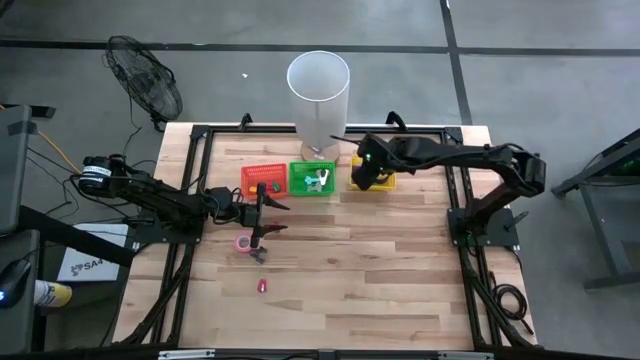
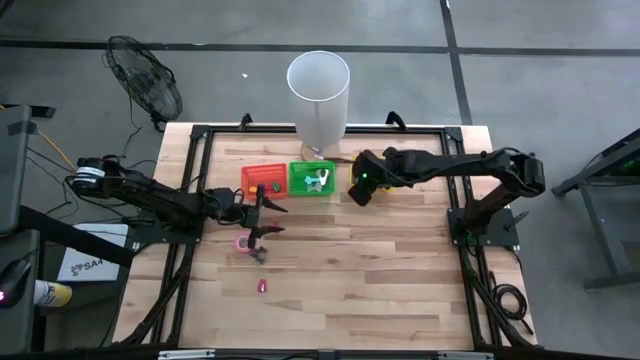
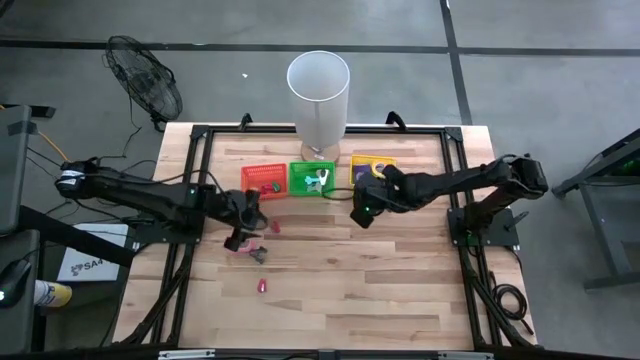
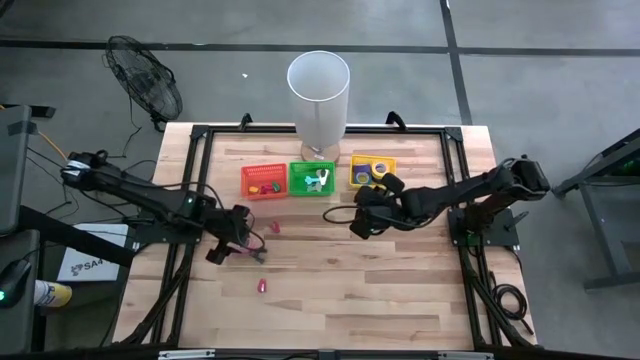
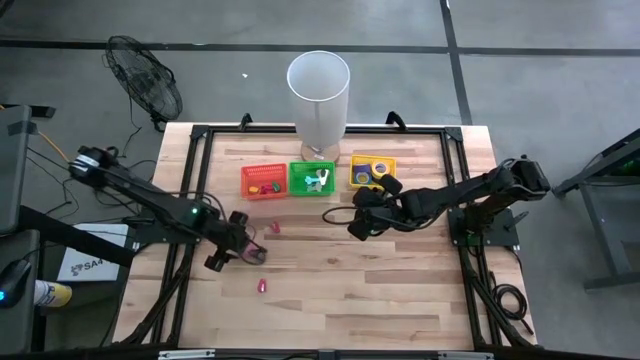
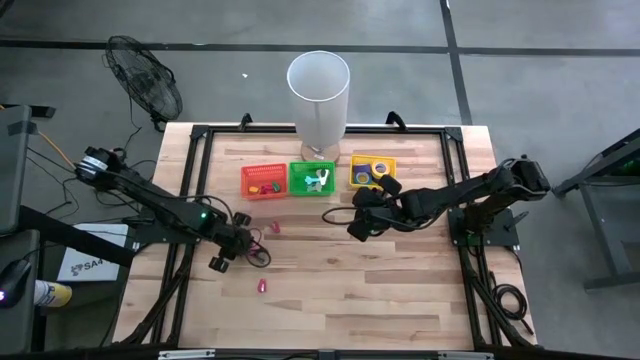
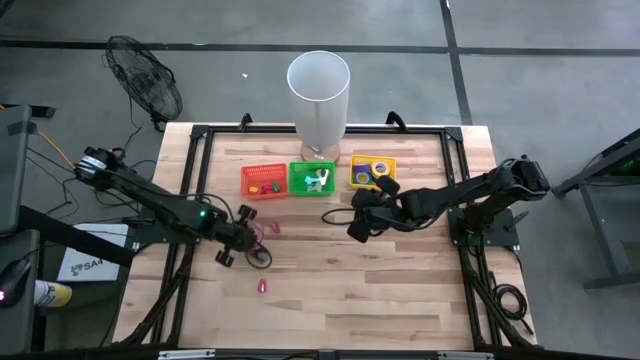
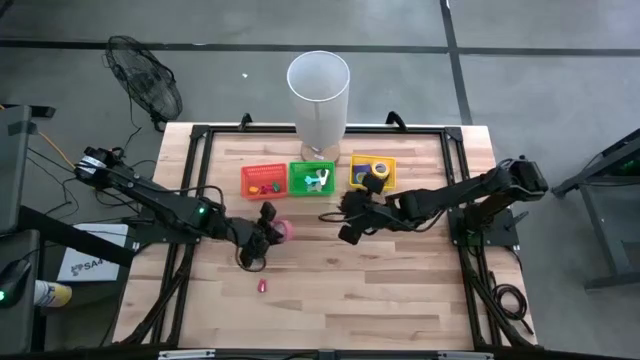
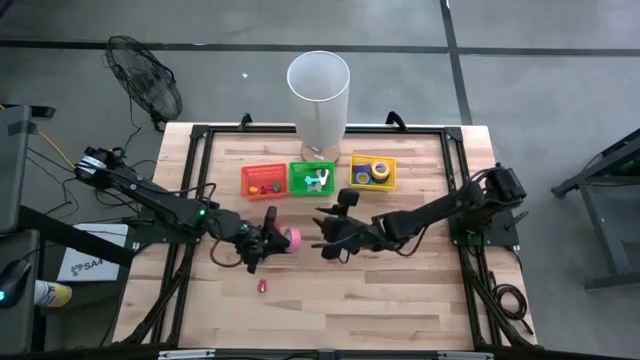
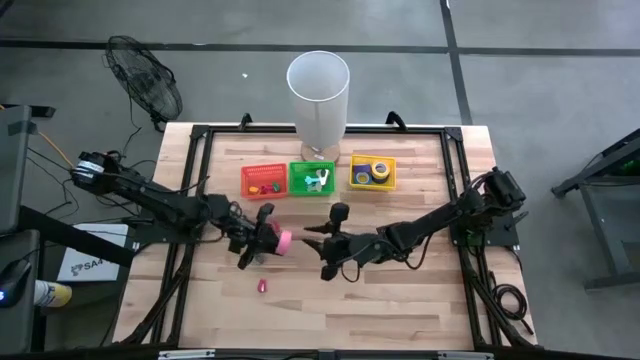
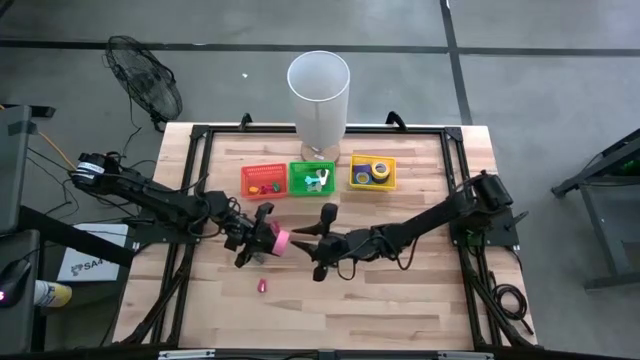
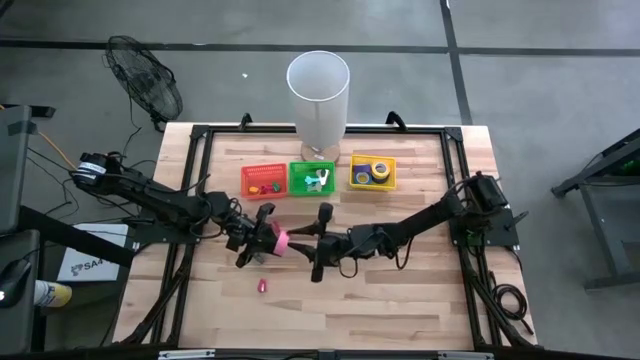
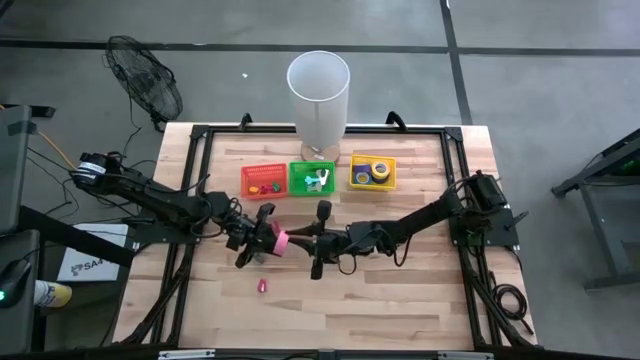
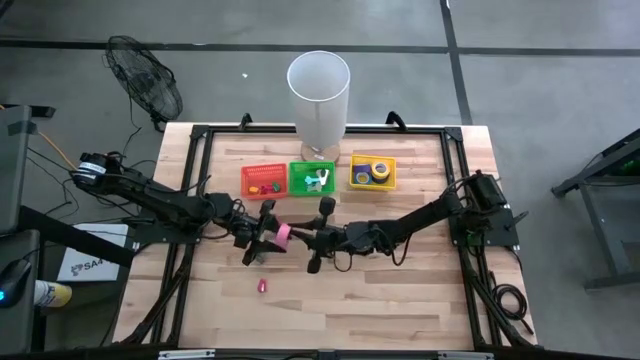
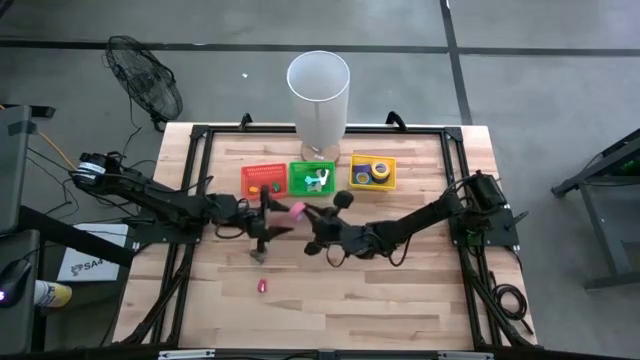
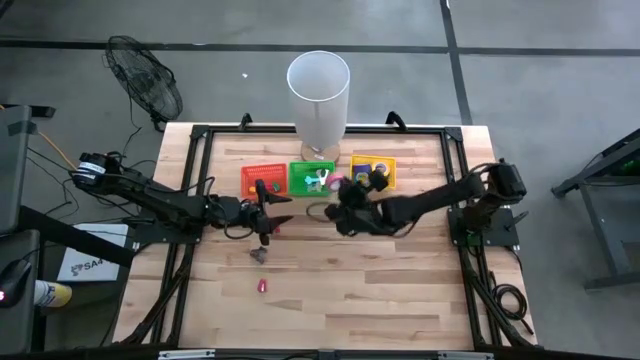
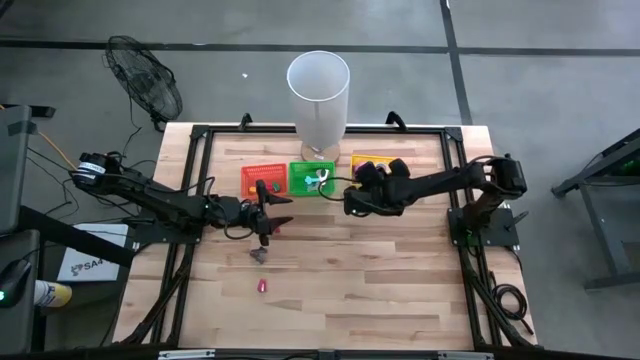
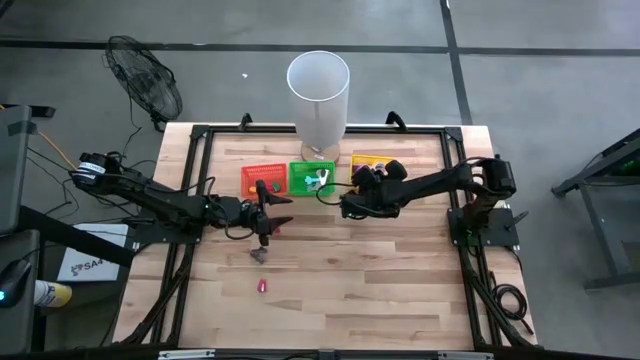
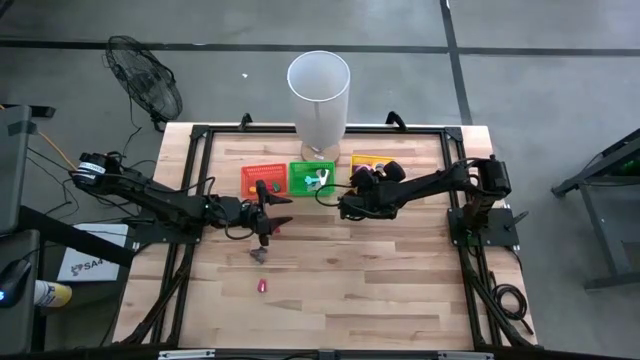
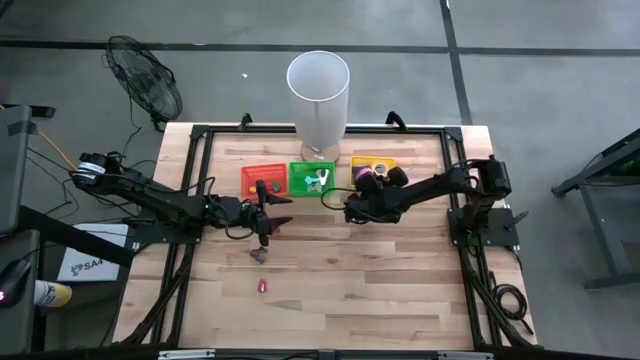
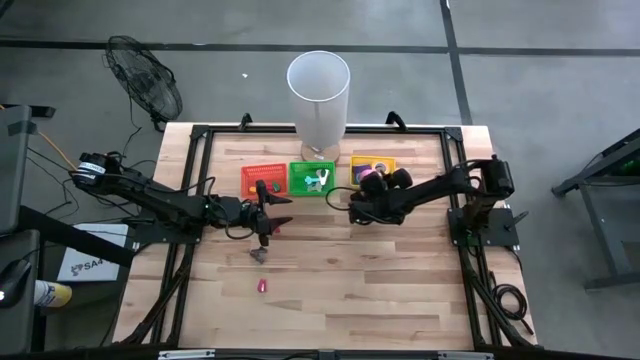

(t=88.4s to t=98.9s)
Task: Pick and place Stapler, Stapler remover, tape
Put the pink tape into the yellow bin

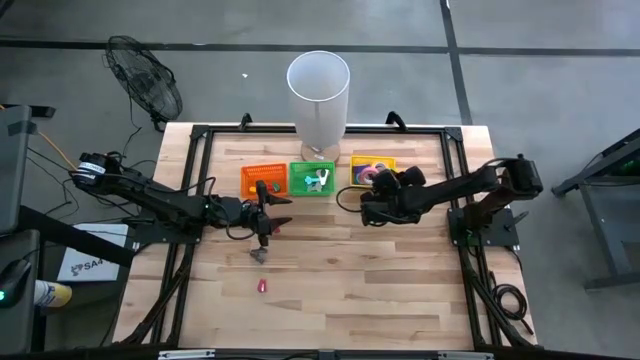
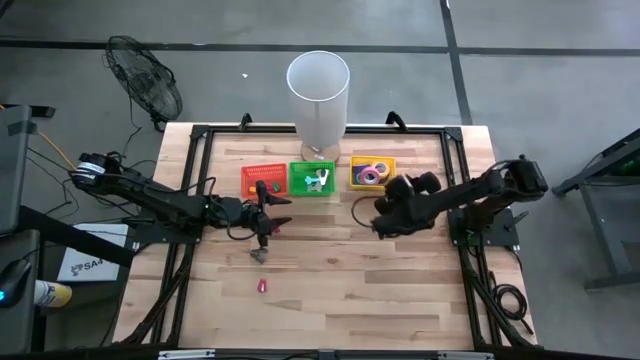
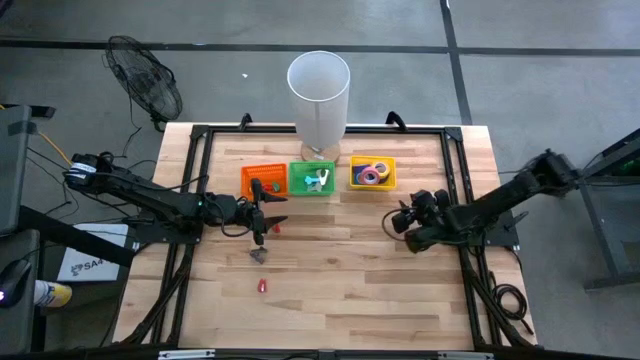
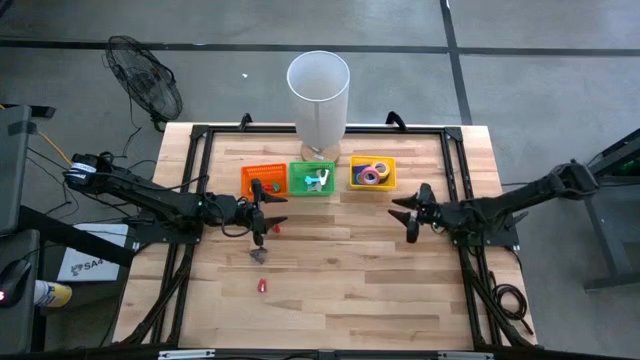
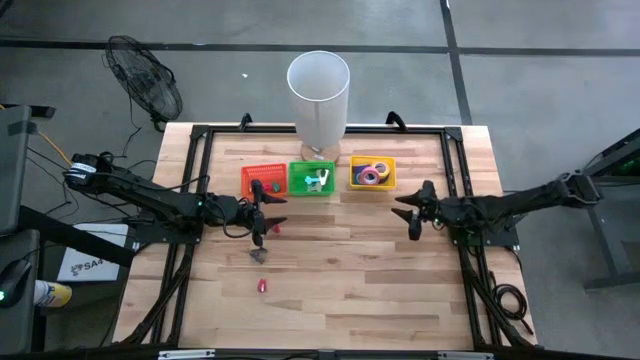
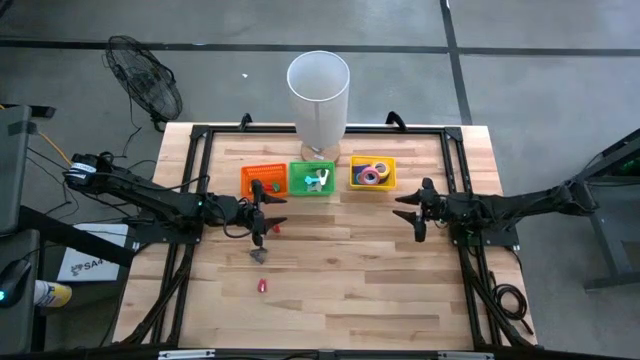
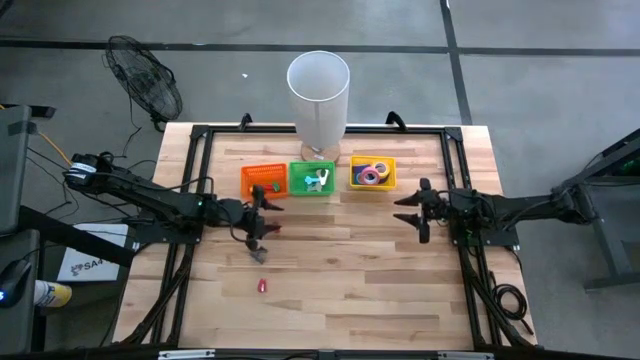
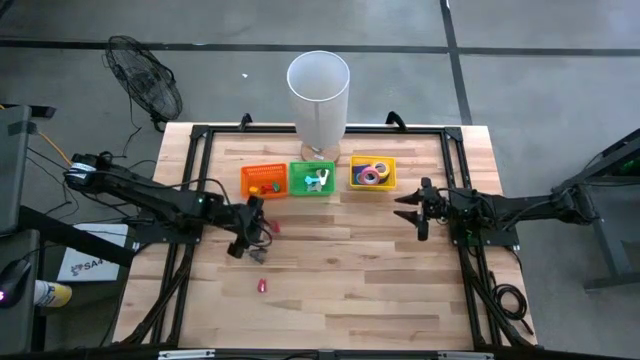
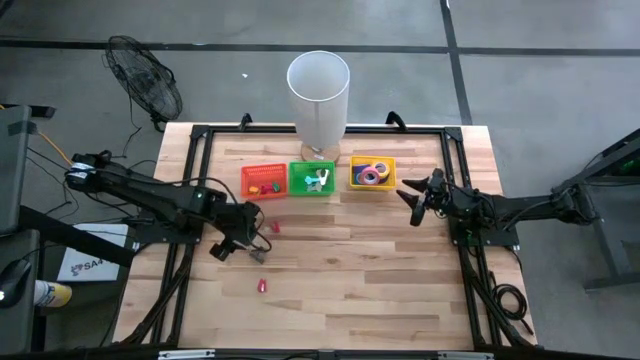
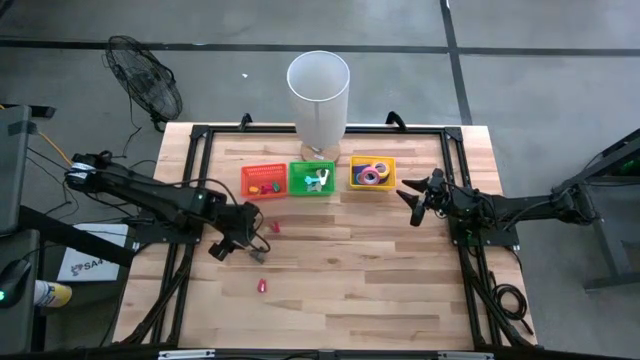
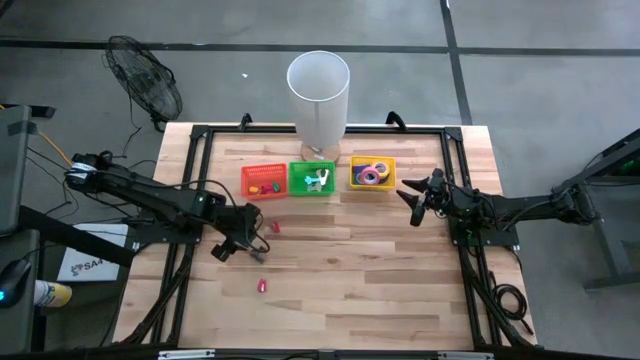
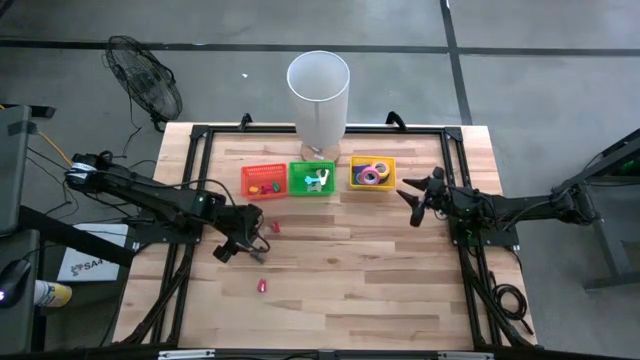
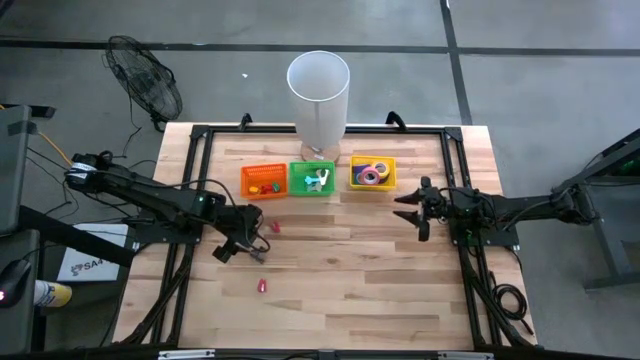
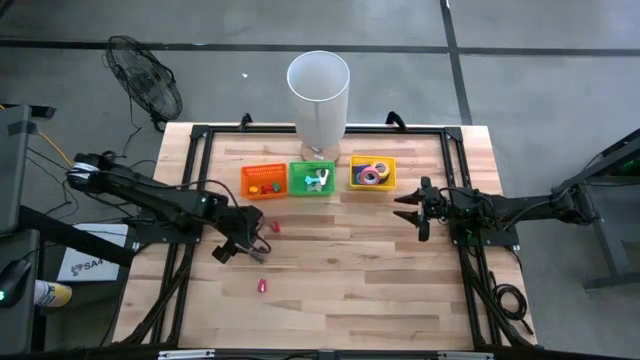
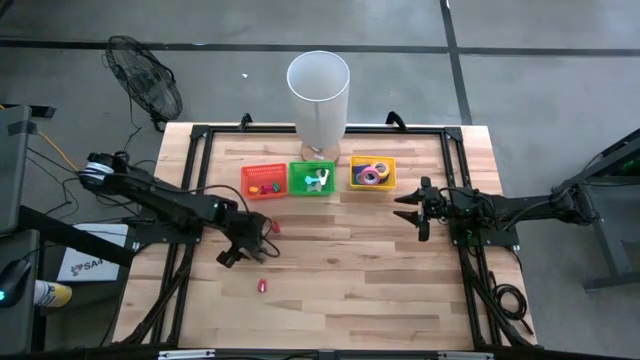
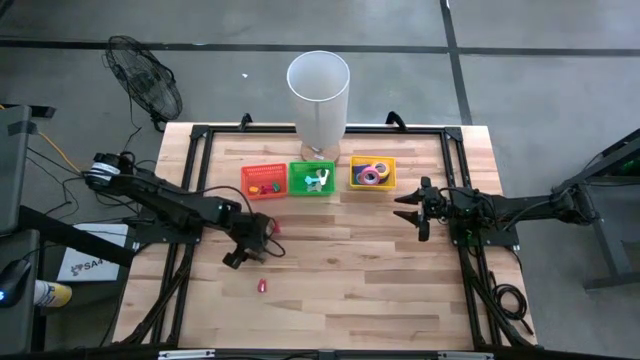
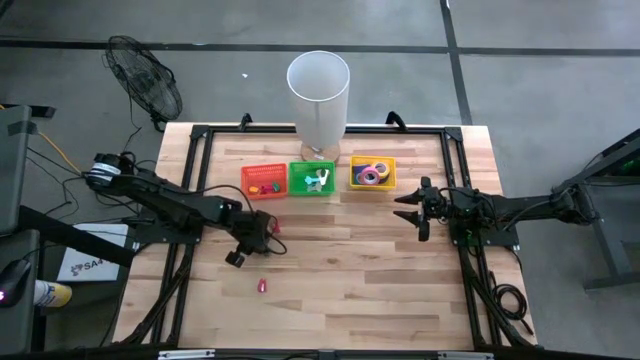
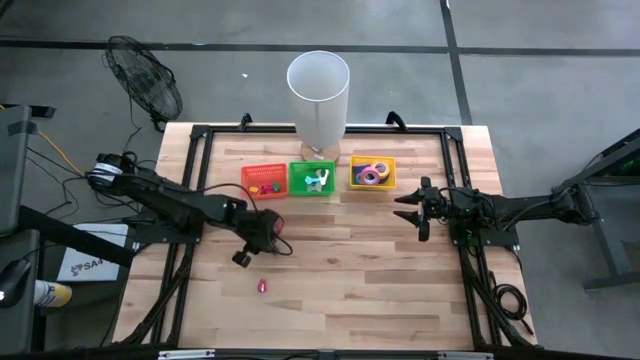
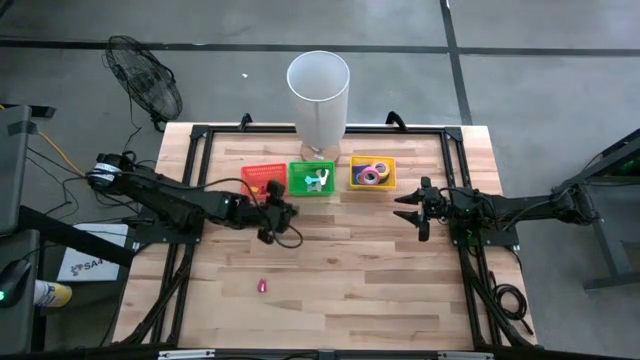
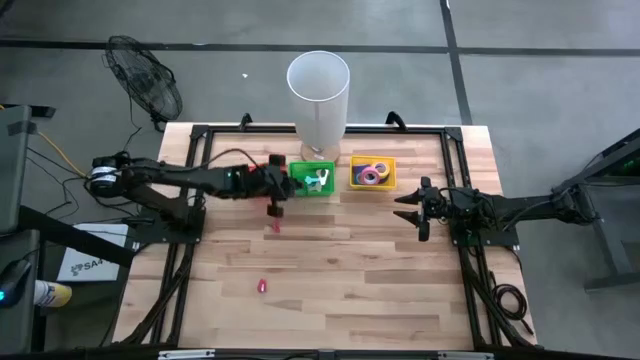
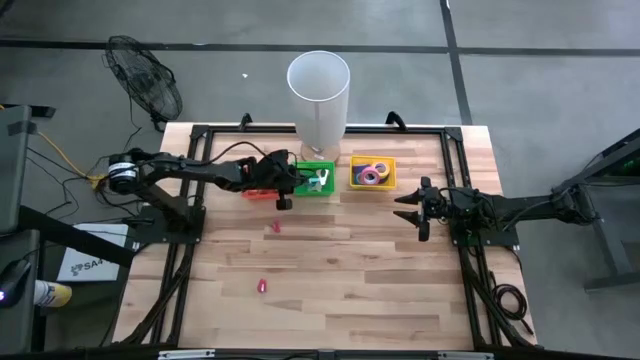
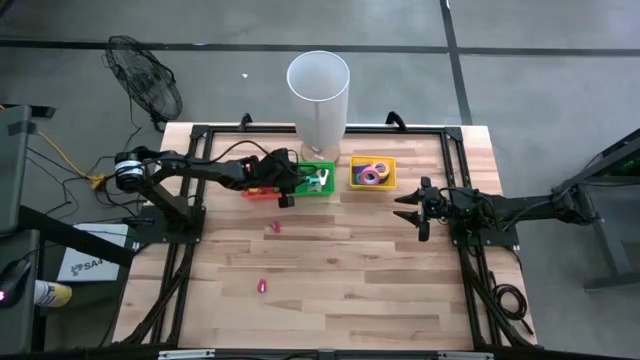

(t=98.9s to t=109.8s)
Put the black staple remover into the green bin

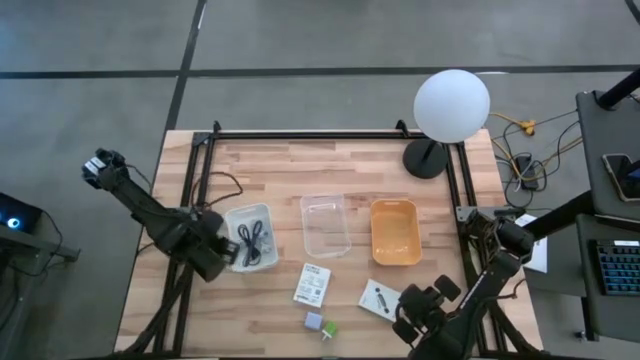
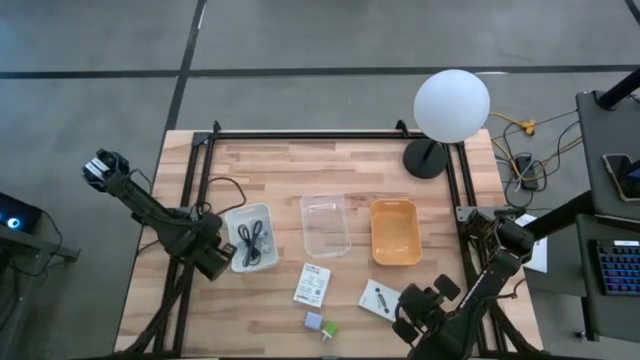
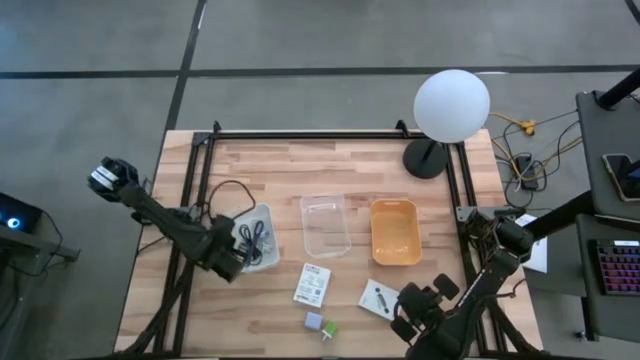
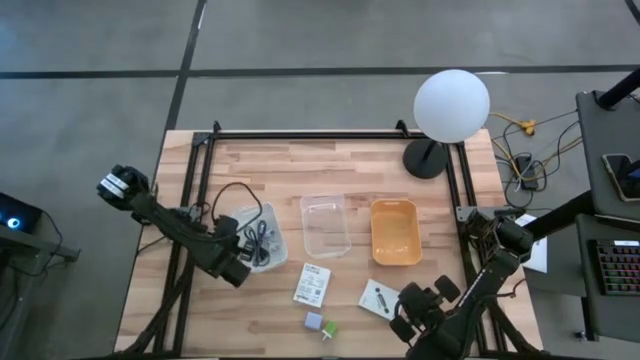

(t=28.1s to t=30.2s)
Task: Pick and place items into bin
Adjust the white bin
